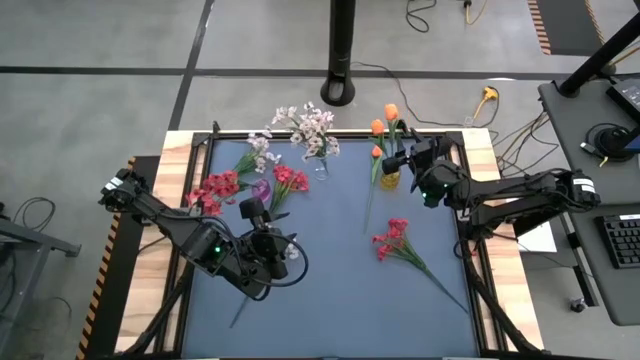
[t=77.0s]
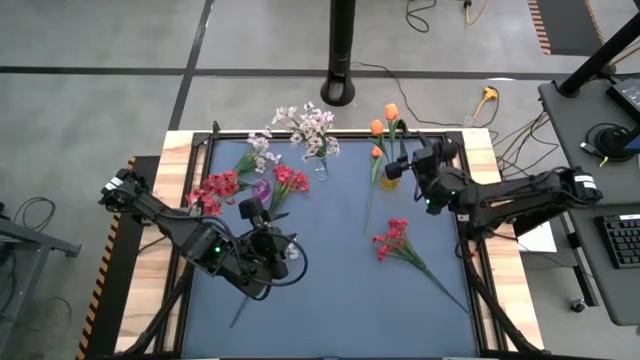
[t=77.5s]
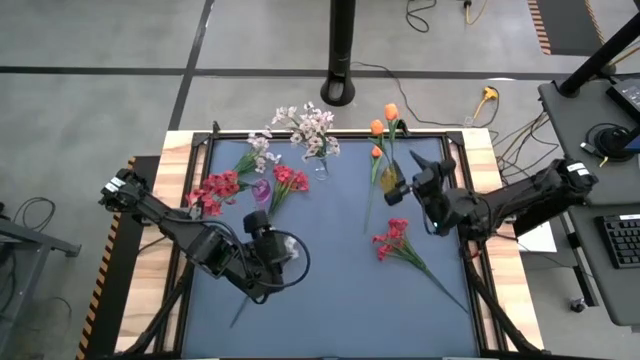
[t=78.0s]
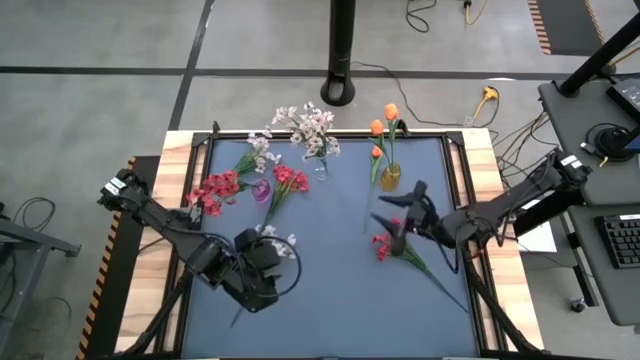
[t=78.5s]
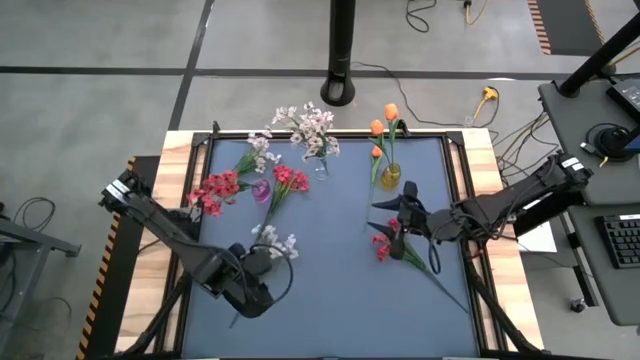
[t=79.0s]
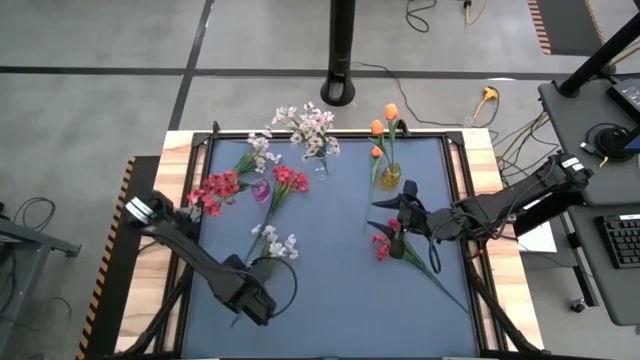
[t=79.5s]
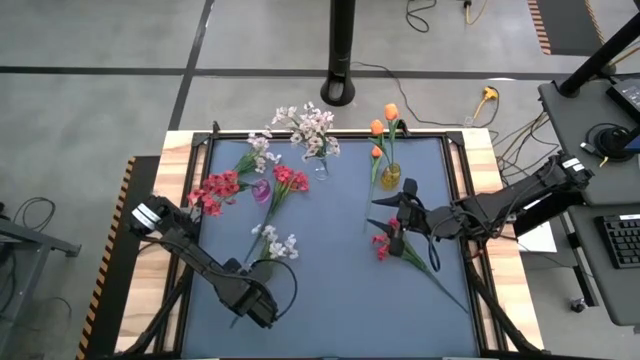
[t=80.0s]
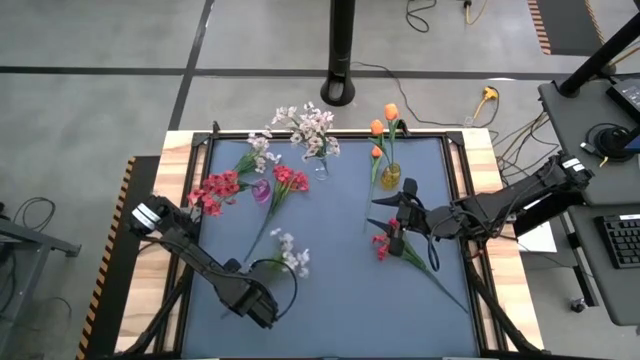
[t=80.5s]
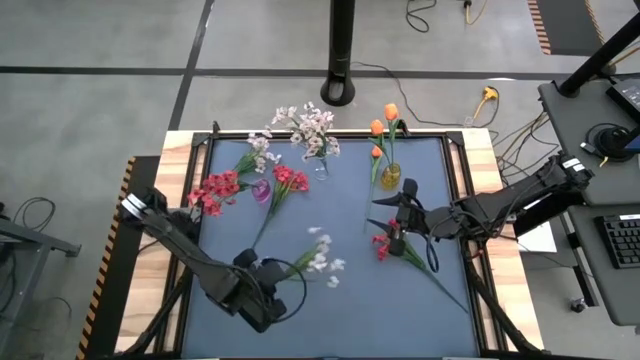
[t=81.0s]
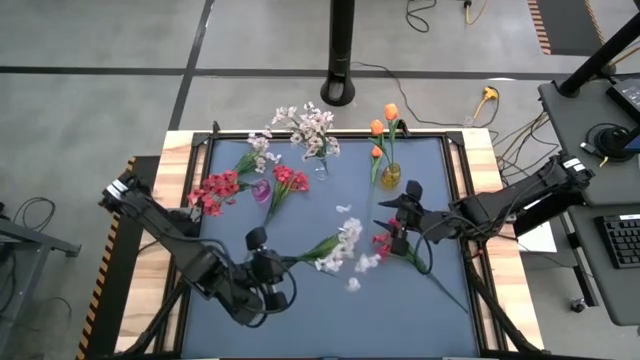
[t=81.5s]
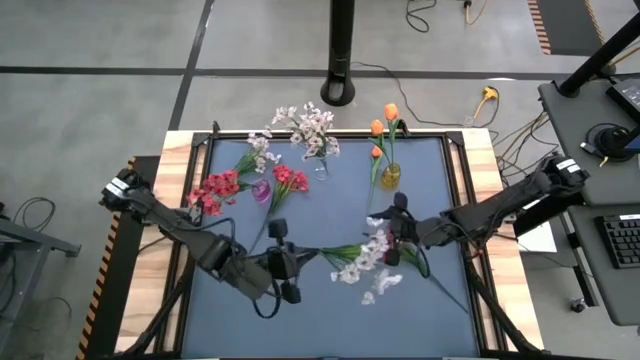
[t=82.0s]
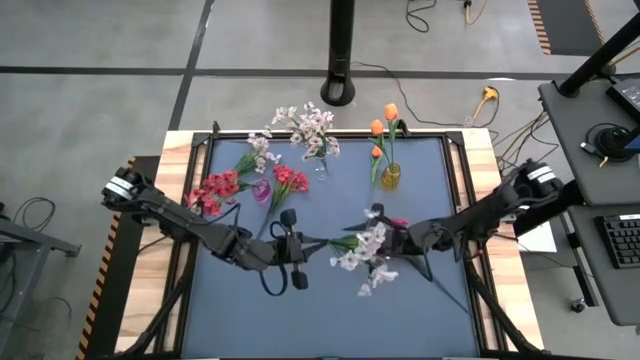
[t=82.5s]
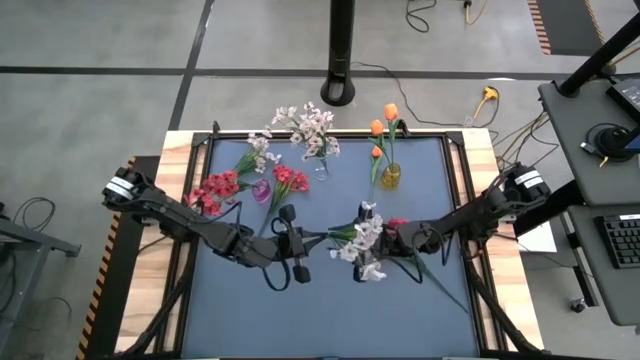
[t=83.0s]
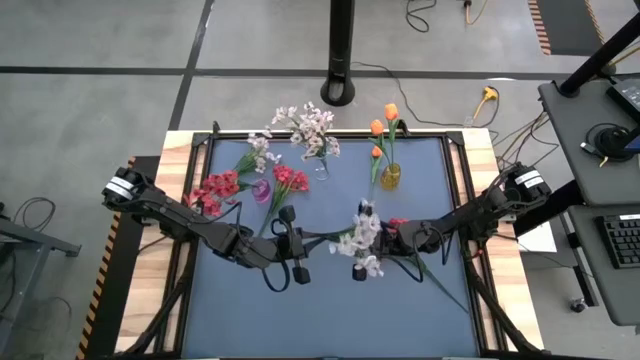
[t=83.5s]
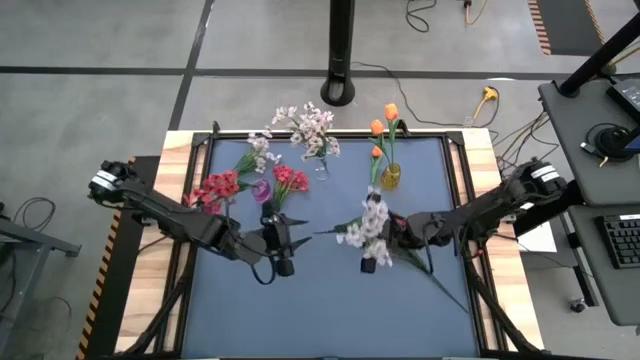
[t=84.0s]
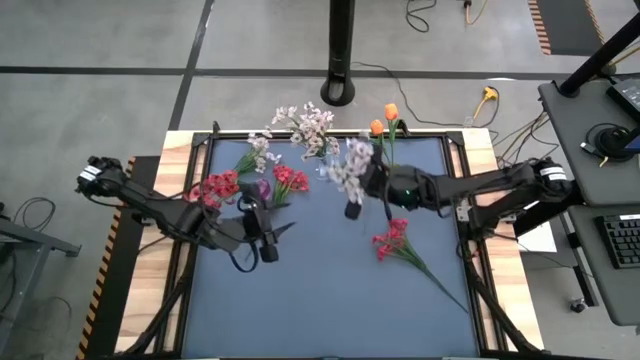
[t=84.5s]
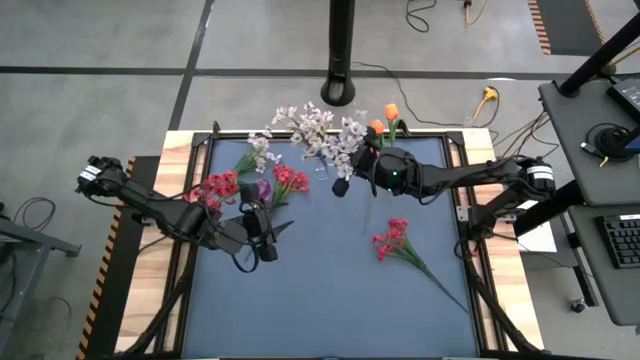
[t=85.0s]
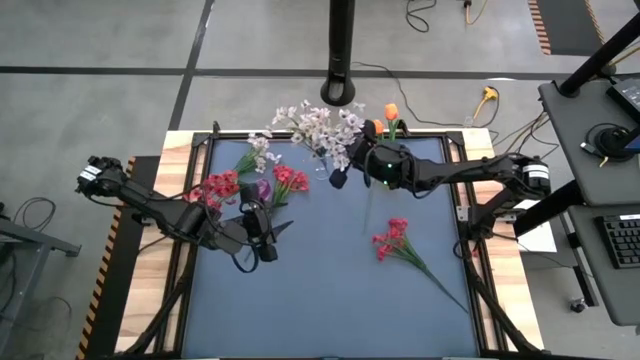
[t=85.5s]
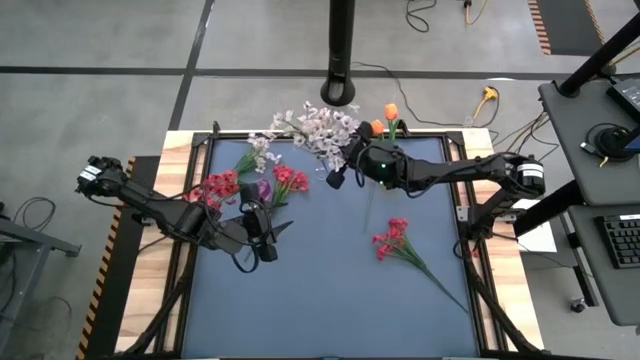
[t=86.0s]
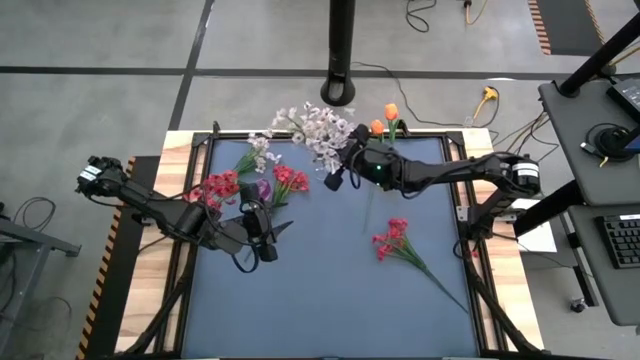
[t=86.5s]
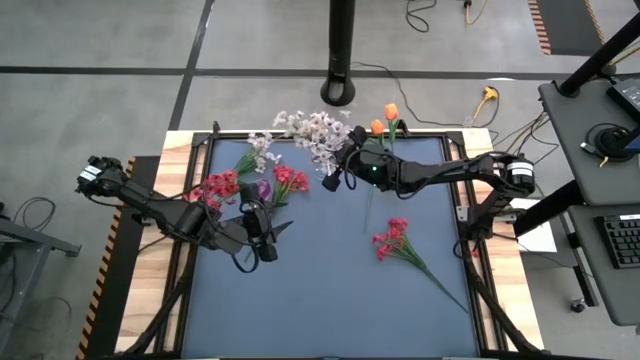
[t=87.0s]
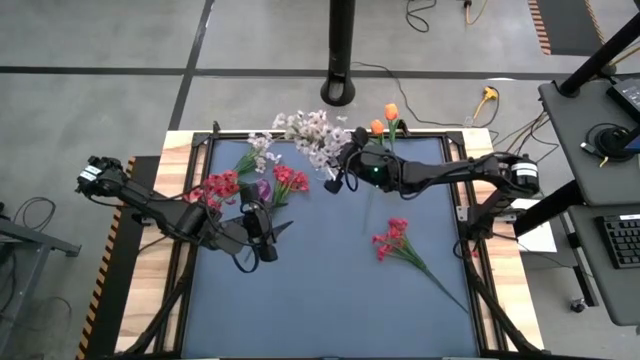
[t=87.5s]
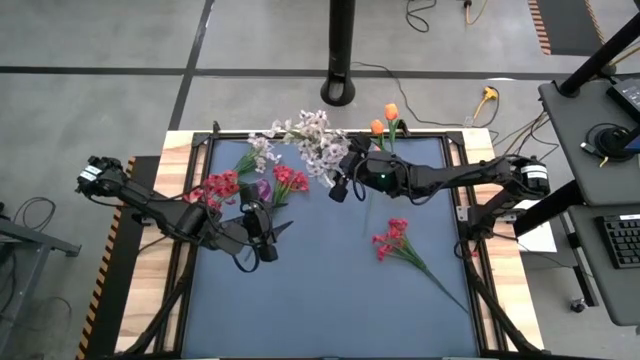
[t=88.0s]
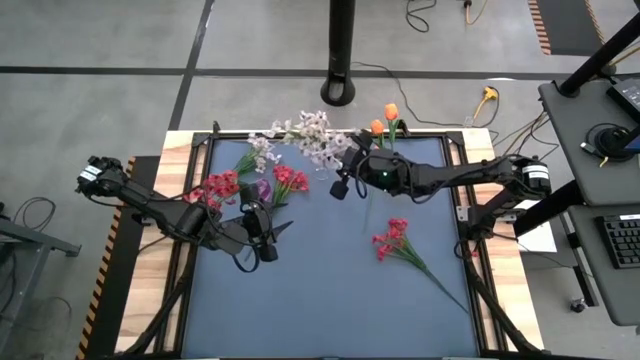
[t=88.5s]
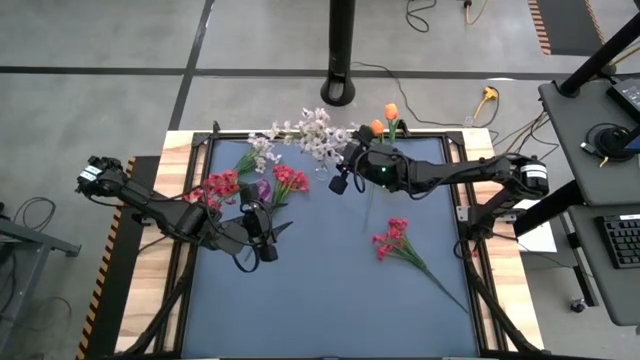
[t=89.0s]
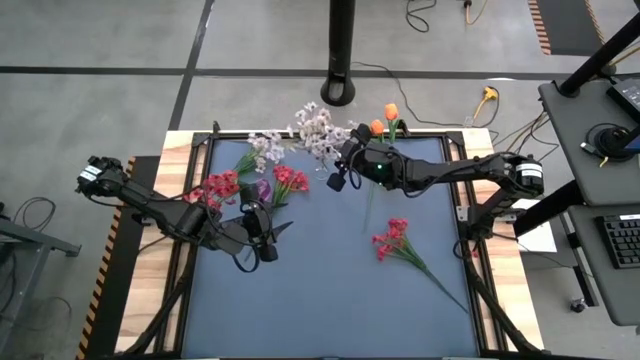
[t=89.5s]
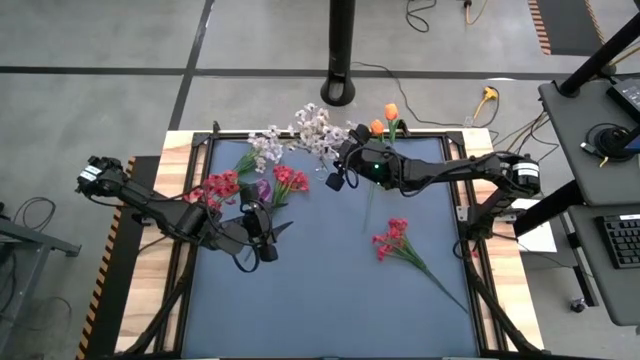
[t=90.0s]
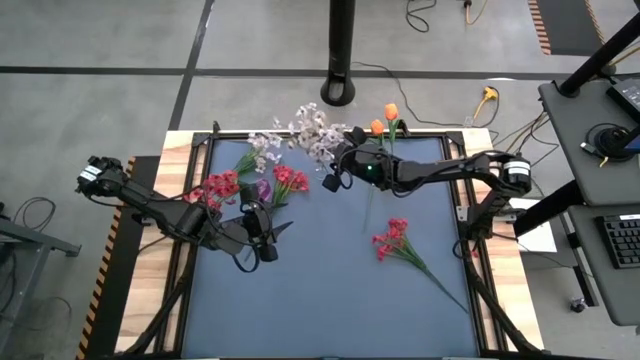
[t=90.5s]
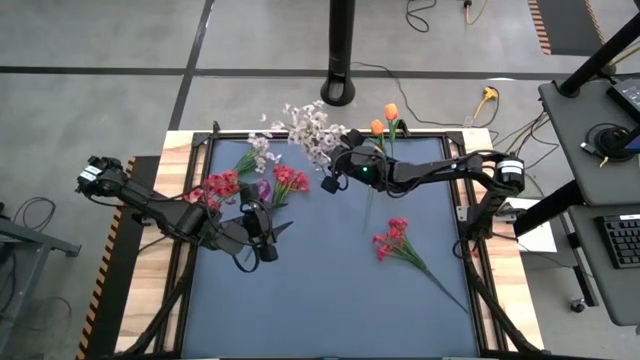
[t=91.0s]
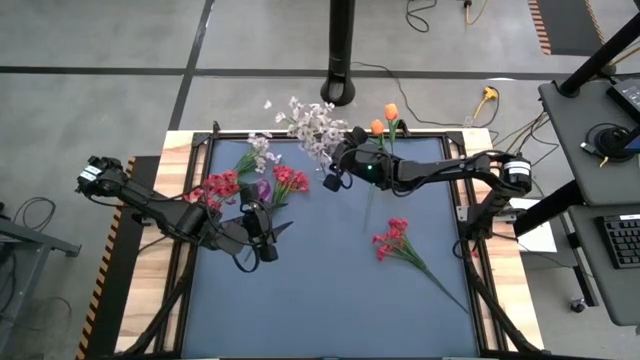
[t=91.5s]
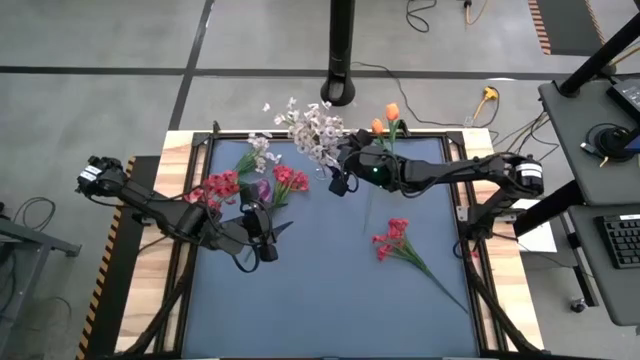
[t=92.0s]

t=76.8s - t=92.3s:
Task: Sort flowers into vase by color
Put the white flower into the transparent vase

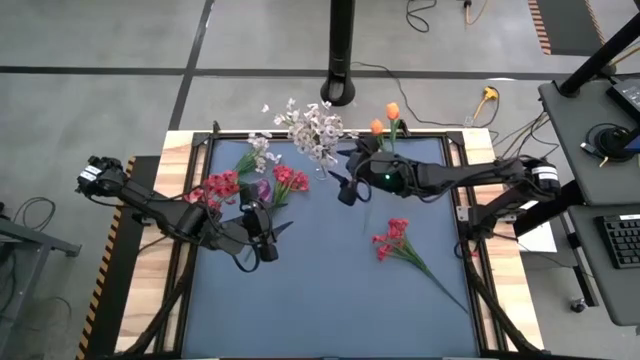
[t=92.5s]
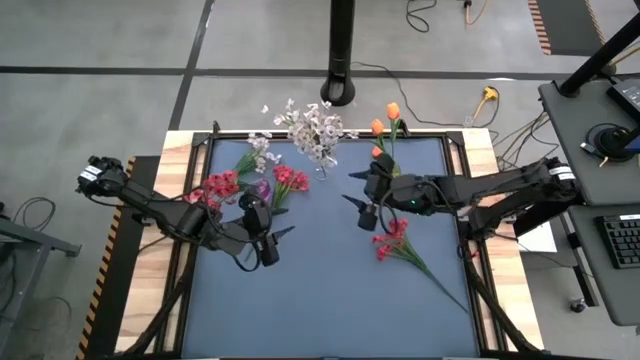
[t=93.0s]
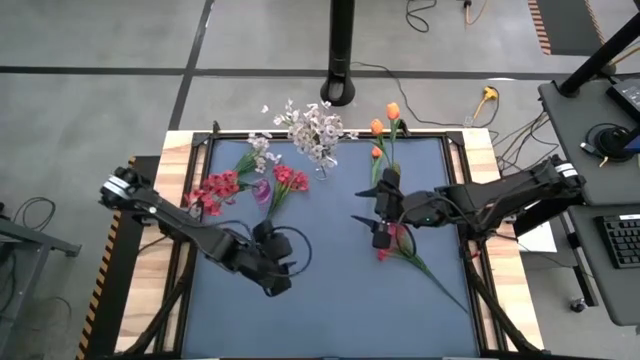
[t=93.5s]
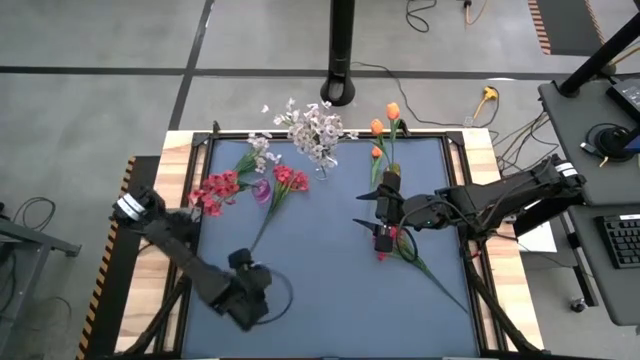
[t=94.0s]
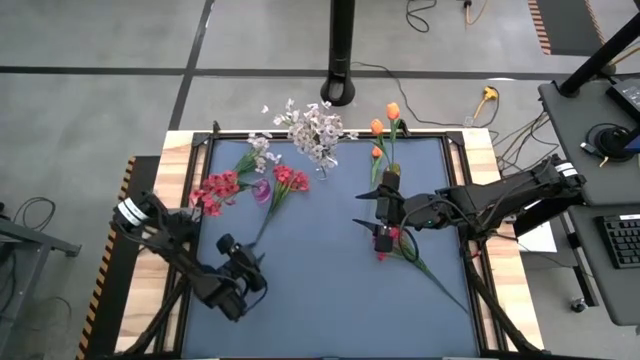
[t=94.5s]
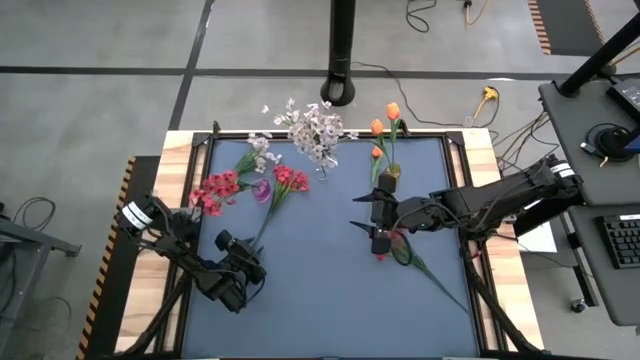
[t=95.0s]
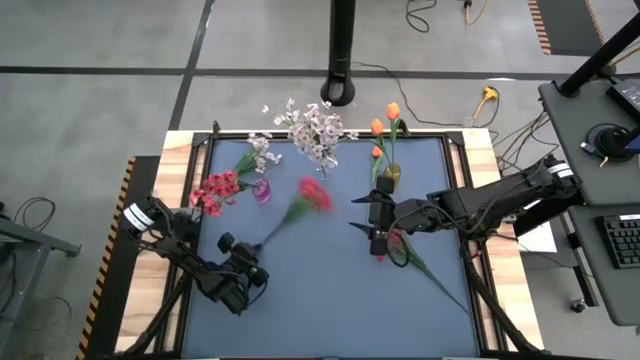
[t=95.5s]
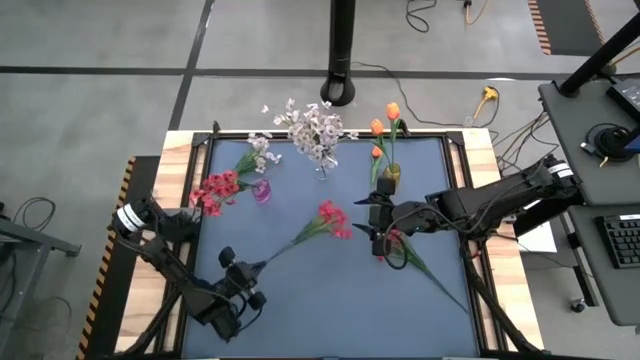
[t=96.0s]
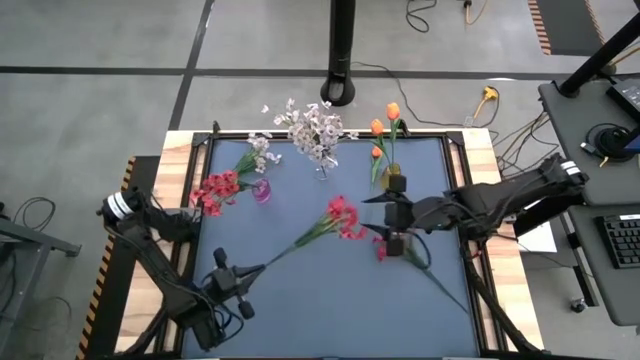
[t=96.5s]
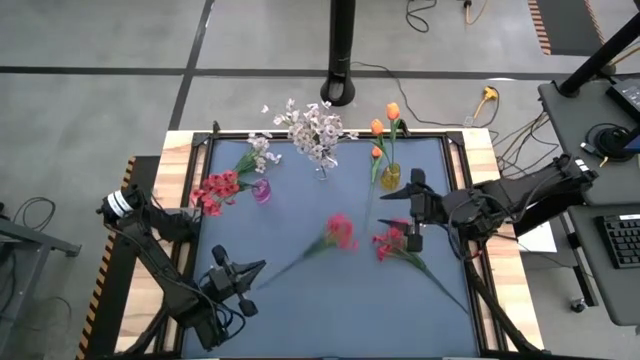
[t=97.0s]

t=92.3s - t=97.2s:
Put the red flower into the purple vase
